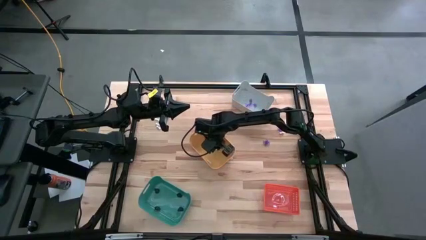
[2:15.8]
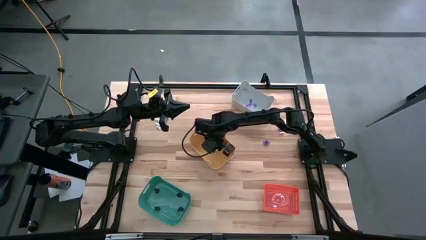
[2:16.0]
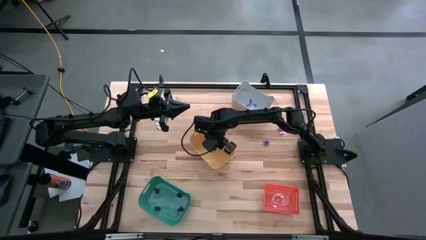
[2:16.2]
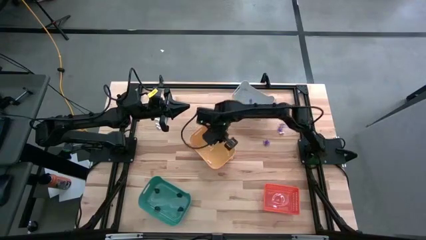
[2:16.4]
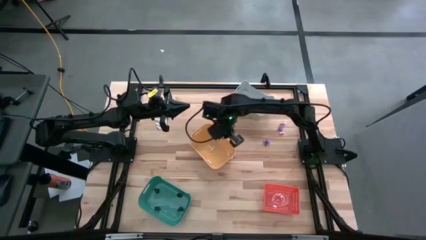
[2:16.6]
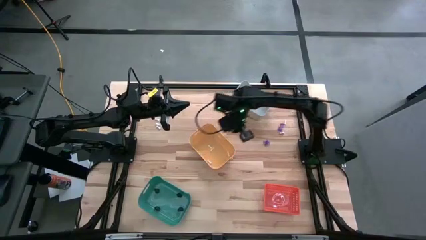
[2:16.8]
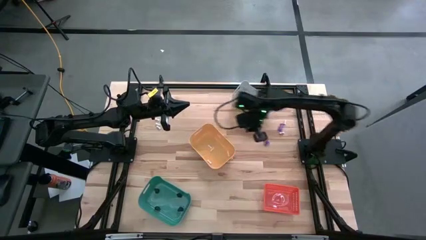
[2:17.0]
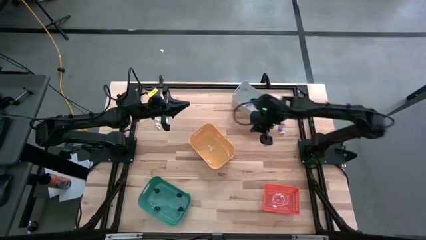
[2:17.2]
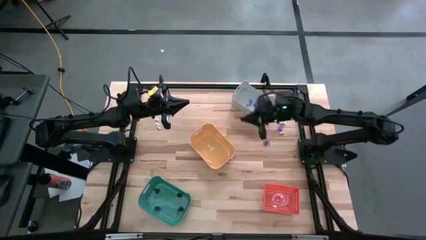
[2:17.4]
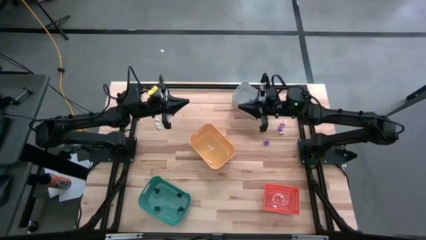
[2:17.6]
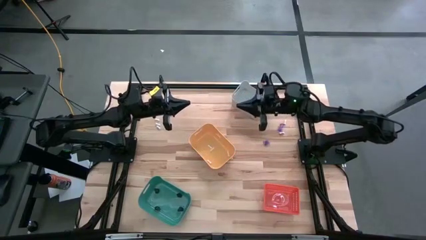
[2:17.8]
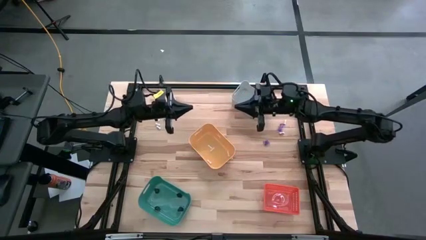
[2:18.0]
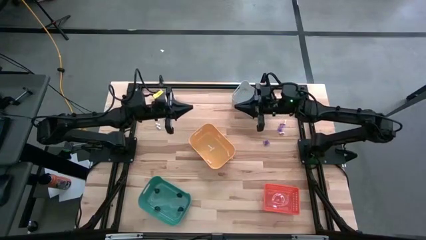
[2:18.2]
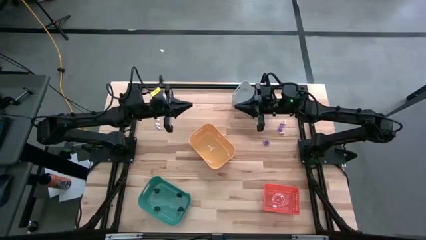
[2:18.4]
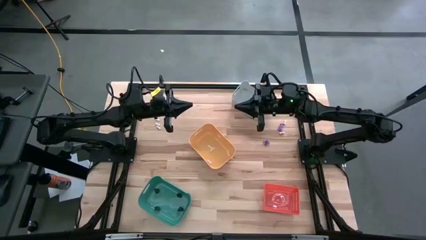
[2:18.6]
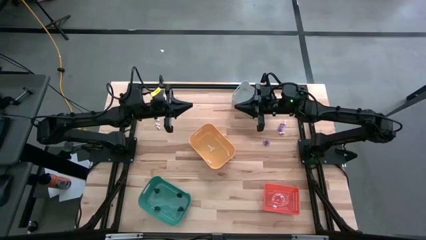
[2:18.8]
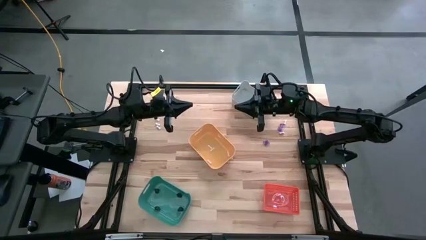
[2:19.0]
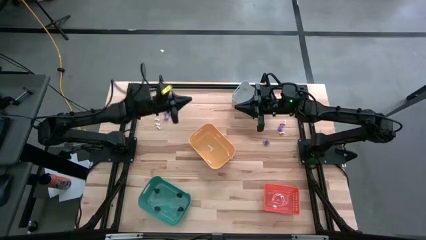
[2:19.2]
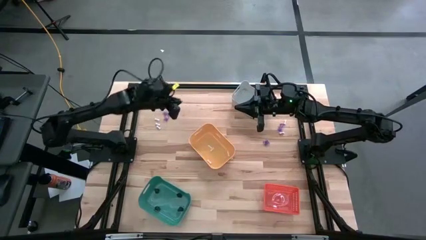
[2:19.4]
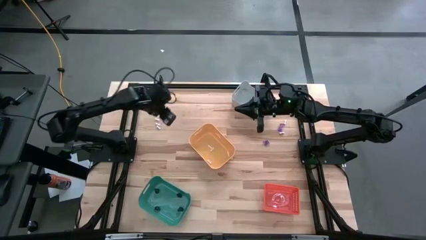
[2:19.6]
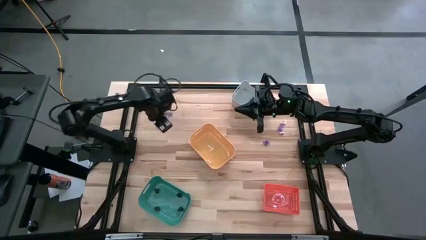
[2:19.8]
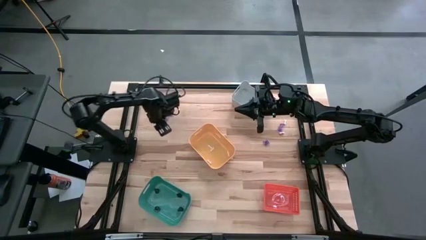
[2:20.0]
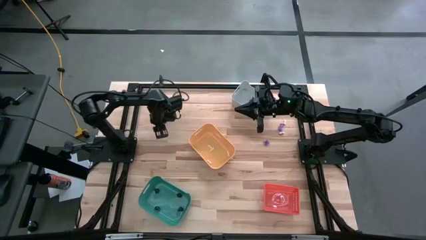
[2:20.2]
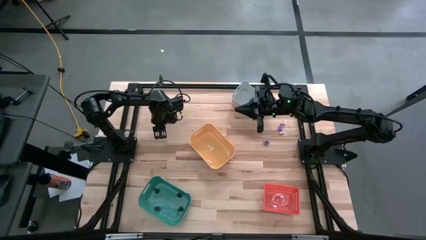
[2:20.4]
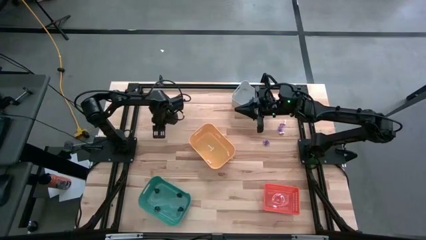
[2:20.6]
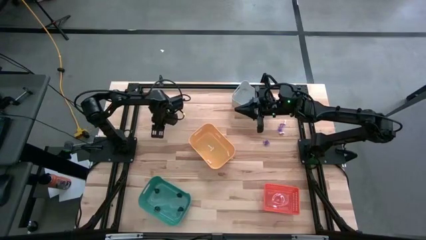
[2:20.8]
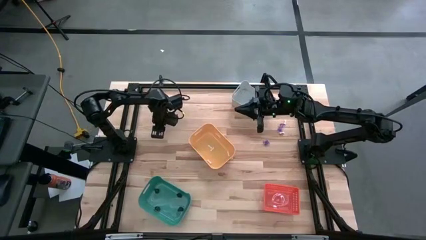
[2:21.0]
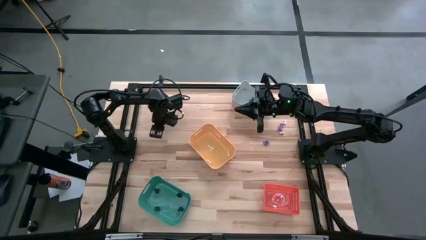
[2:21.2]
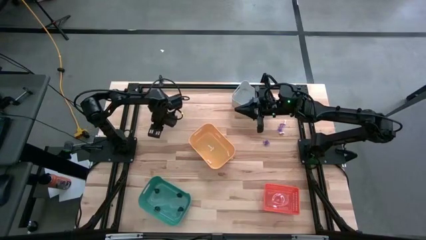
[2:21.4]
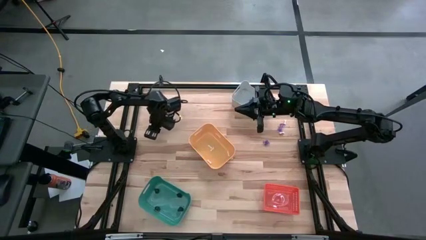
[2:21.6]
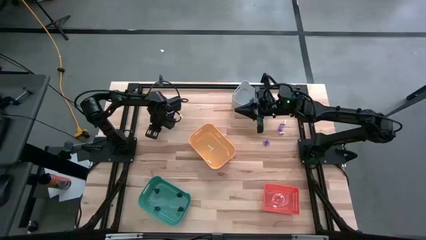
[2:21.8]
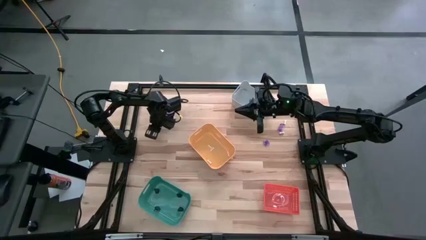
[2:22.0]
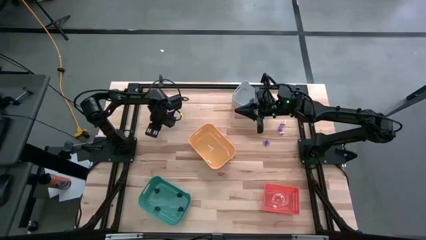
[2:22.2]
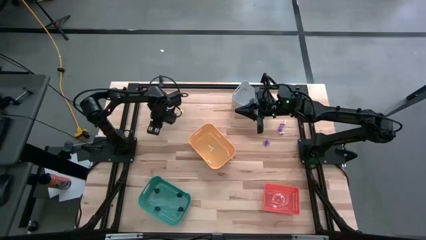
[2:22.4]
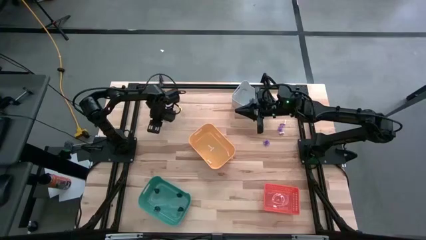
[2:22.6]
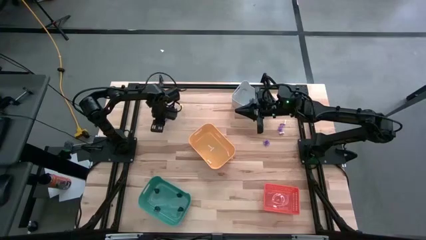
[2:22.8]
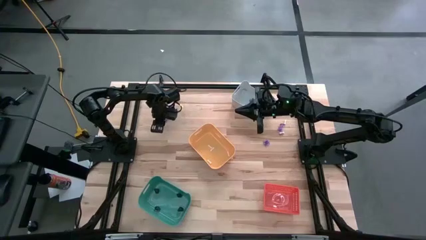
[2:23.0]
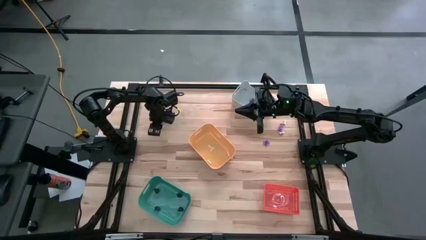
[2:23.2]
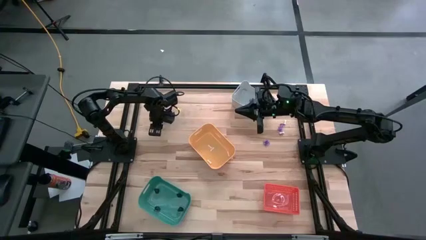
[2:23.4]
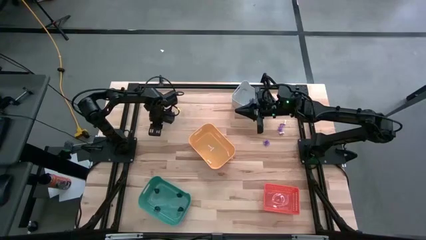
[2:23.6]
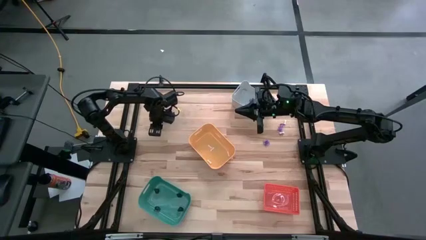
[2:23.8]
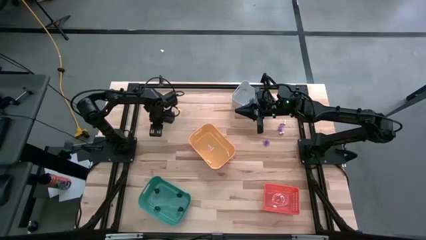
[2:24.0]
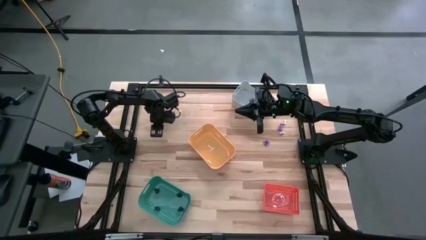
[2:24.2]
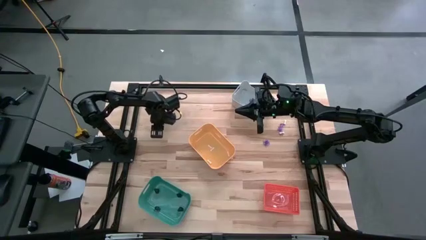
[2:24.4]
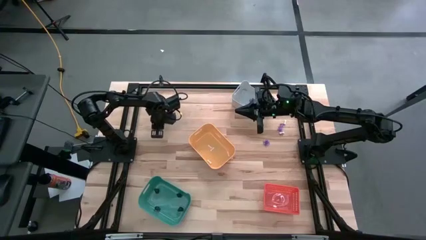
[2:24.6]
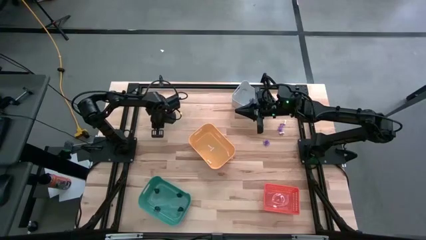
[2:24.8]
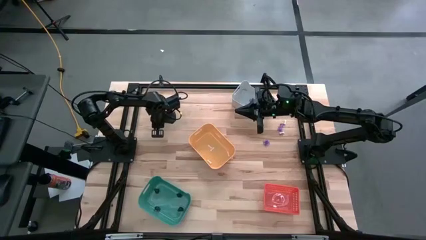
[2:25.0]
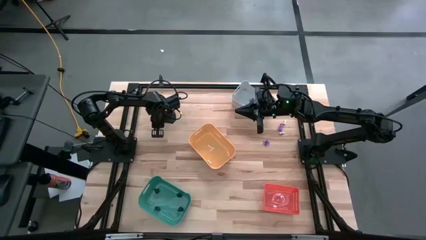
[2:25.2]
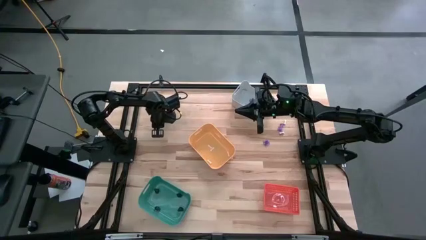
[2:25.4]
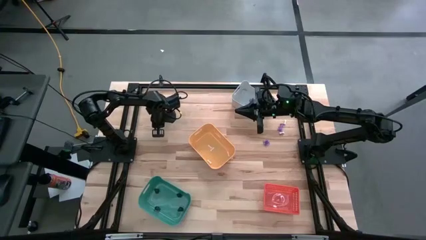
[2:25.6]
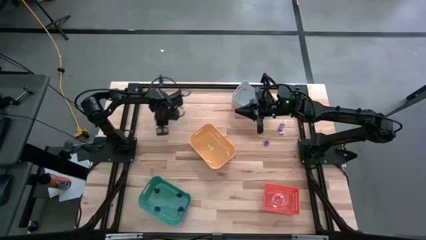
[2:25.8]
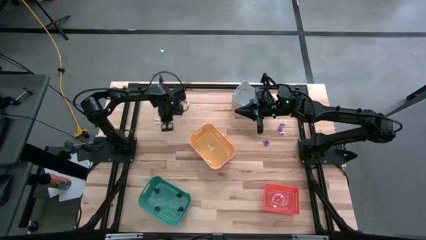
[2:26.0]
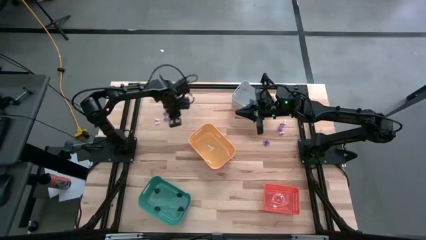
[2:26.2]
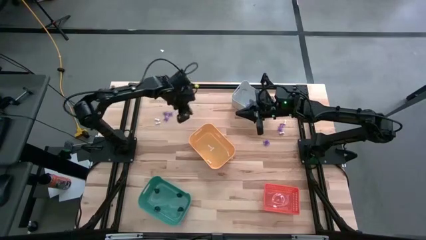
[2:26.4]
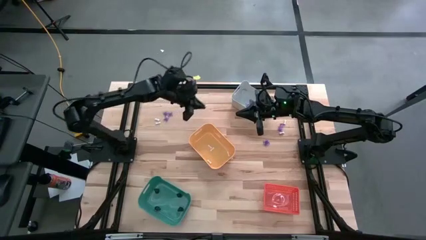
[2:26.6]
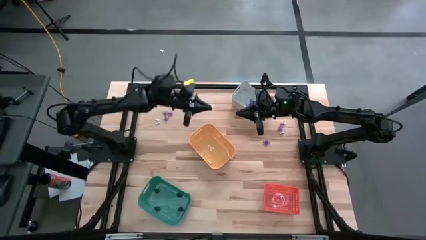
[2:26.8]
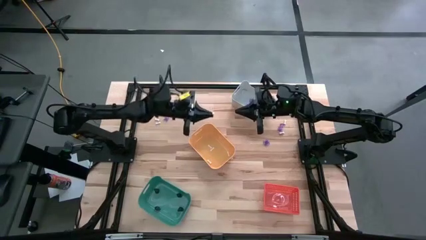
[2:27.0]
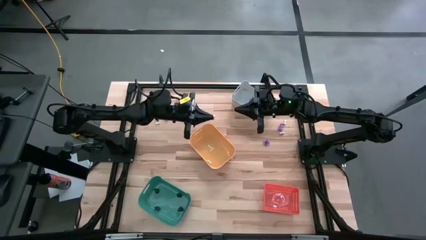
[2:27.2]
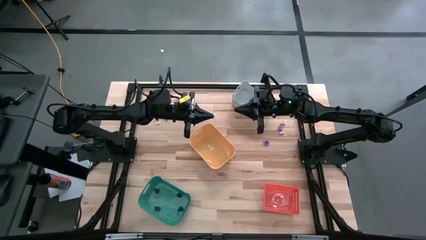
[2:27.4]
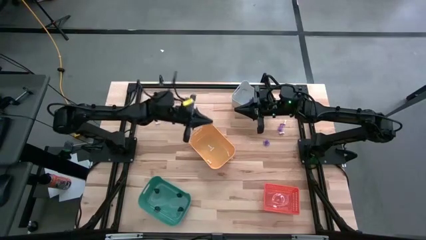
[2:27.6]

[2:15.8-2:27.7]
Task: Sort Halloween decoration
Put the white bone toy into the yellow bin

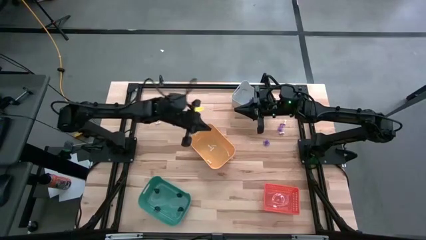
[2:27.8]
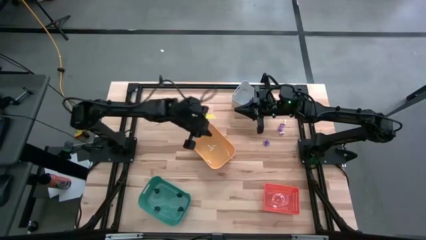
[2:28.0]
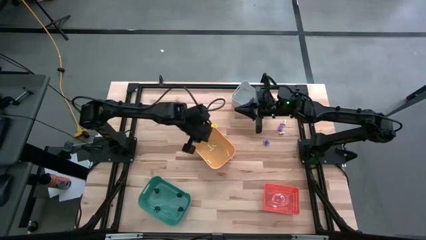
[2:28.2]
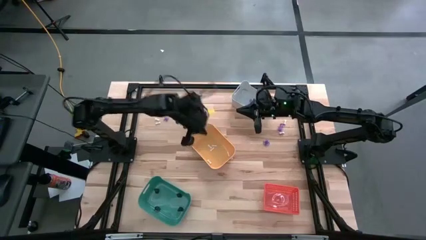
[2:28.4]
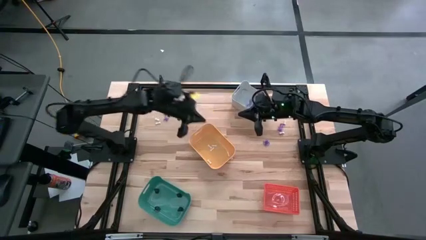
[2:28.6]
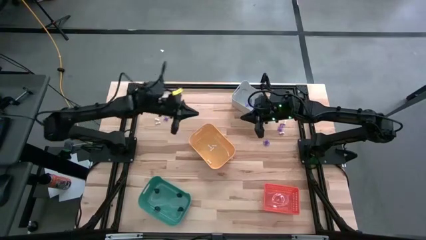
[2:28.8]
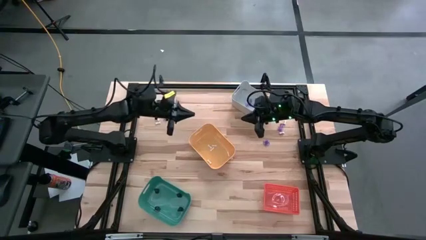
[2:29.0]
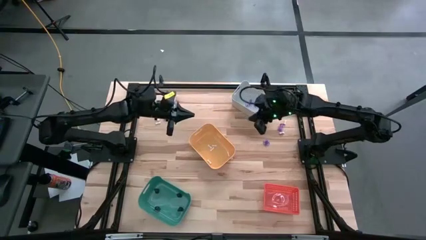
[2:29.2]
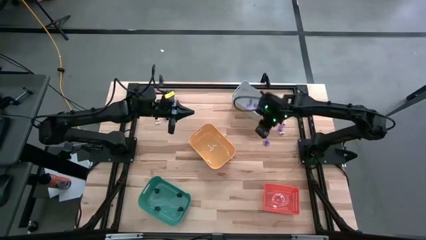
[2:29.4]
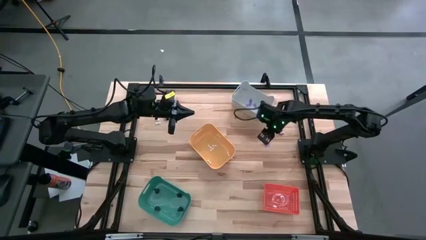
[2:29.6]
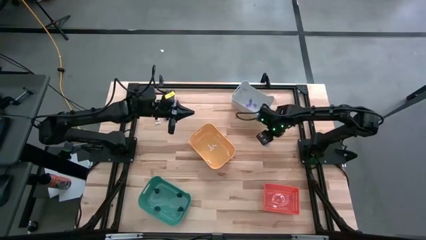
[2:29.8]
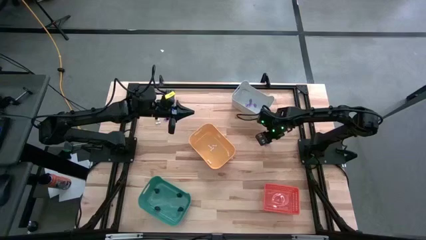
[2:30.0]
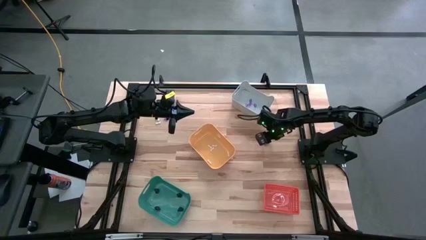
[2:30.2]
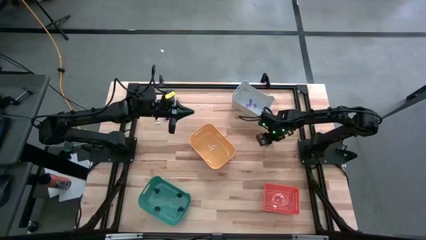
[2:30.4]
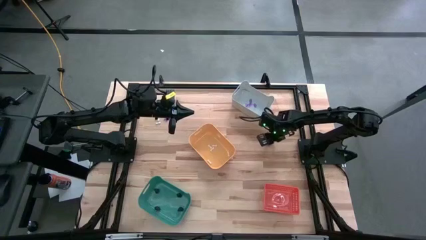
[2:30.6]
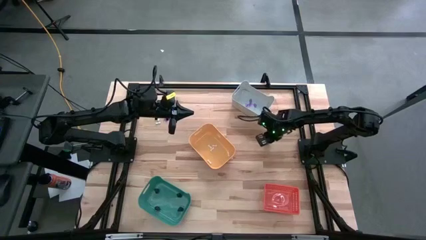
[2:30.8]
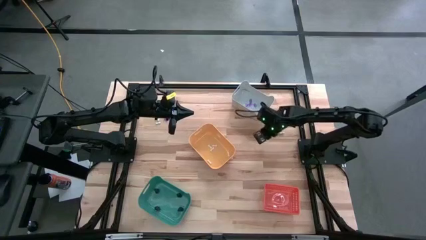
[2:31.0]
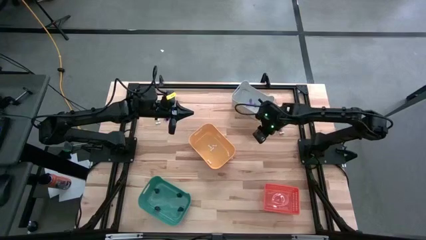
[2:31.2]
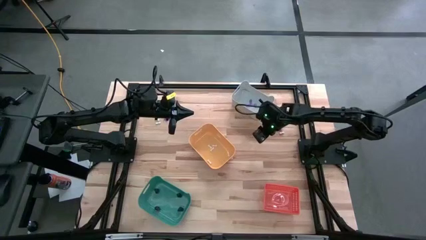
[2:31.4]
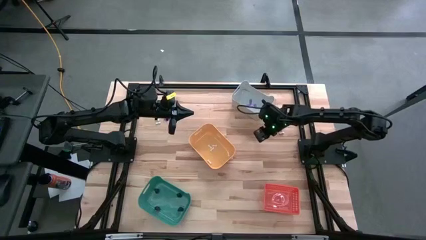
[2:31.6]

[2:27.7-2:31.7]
Put the purple spider toy into the orange bin
